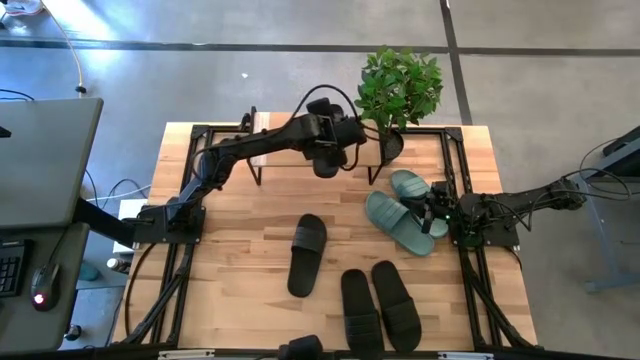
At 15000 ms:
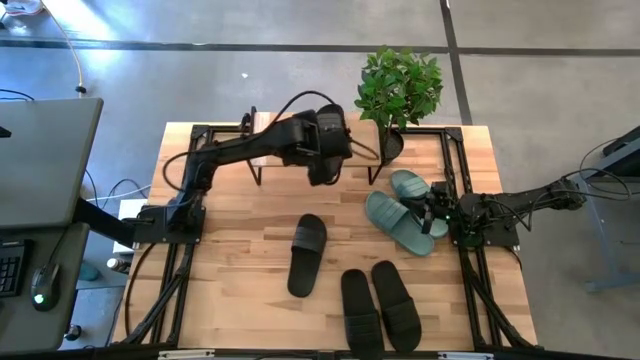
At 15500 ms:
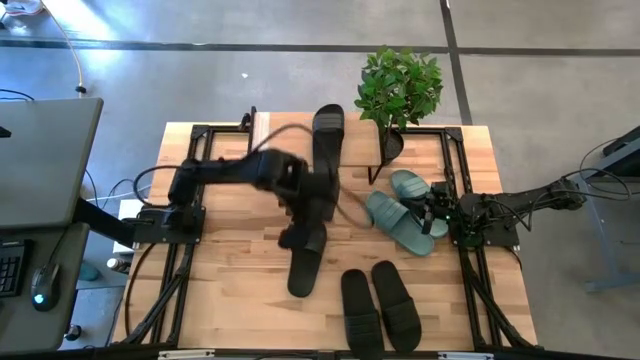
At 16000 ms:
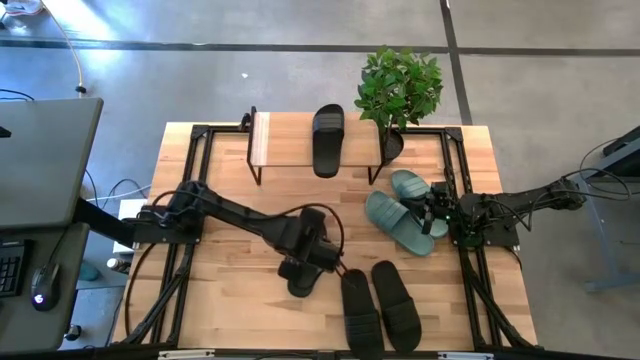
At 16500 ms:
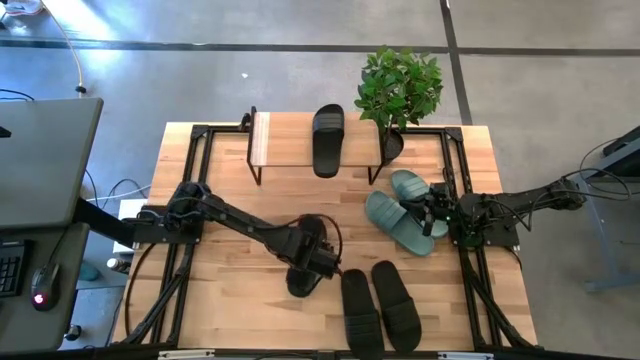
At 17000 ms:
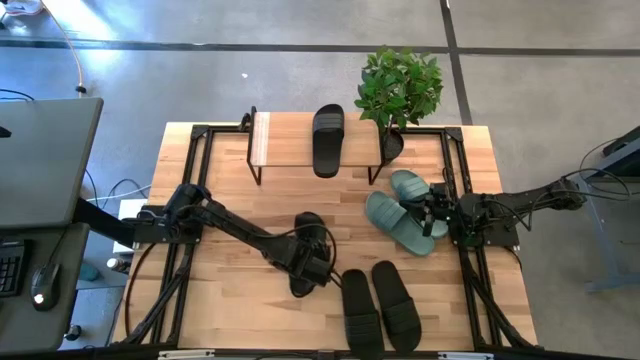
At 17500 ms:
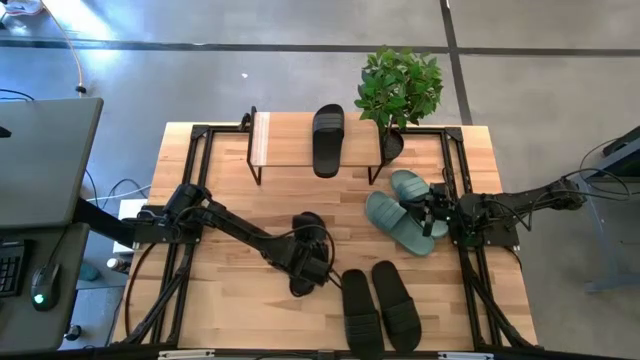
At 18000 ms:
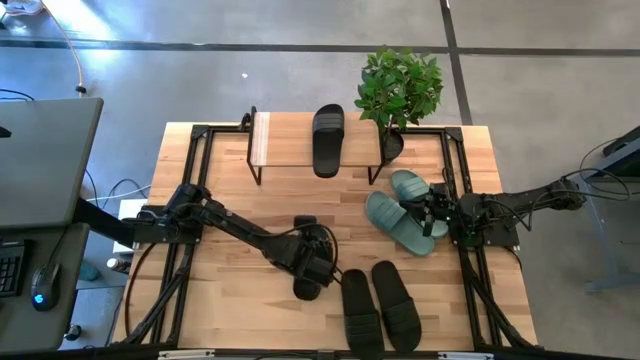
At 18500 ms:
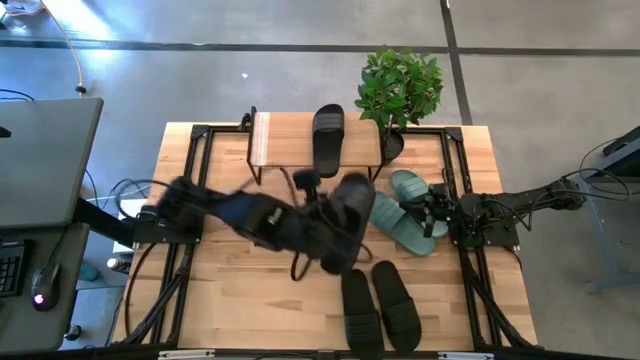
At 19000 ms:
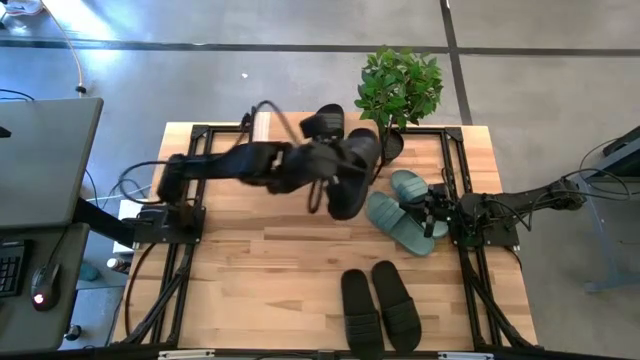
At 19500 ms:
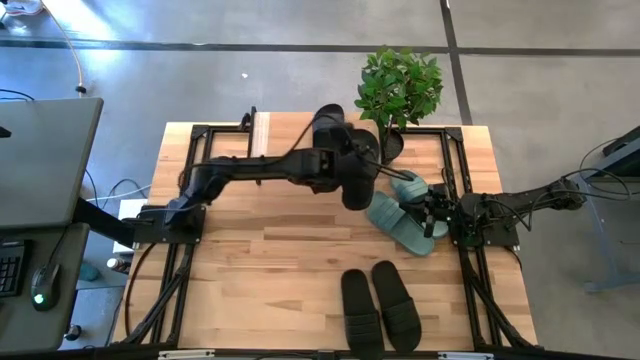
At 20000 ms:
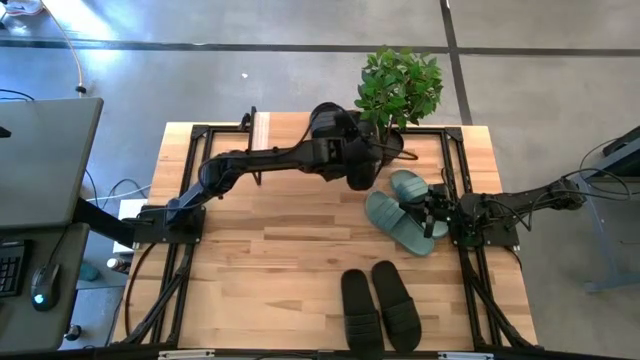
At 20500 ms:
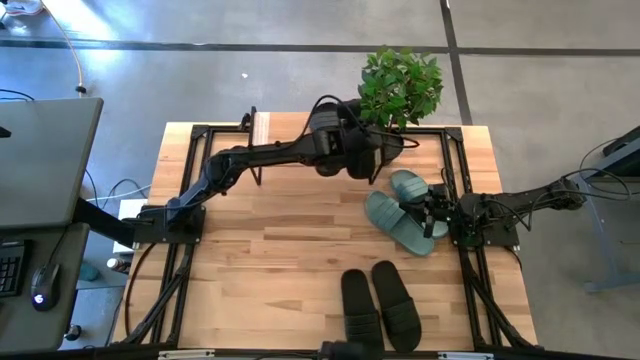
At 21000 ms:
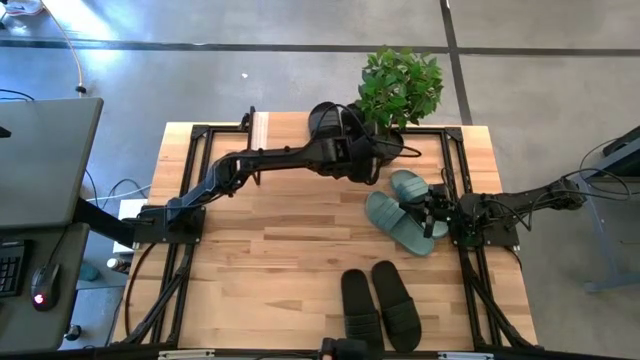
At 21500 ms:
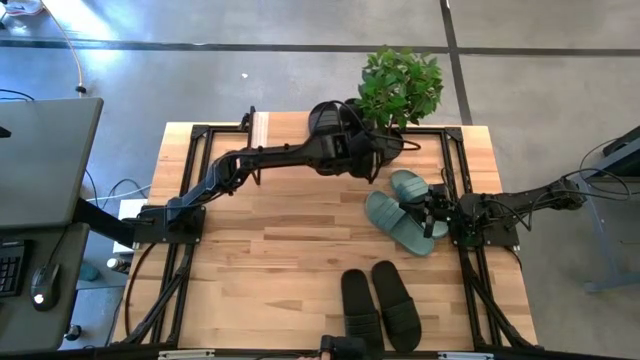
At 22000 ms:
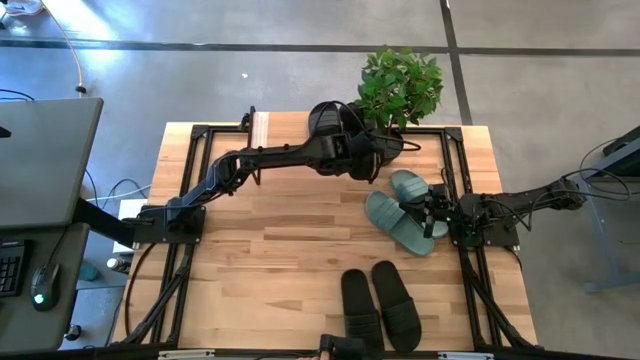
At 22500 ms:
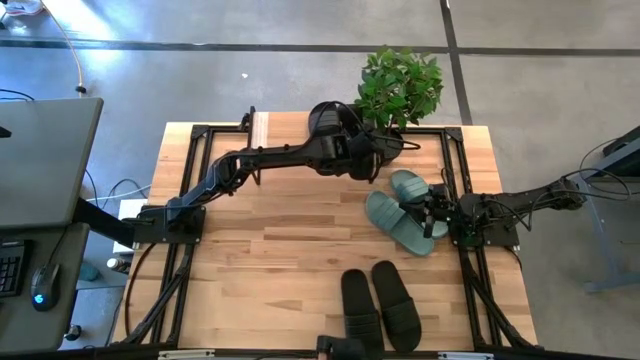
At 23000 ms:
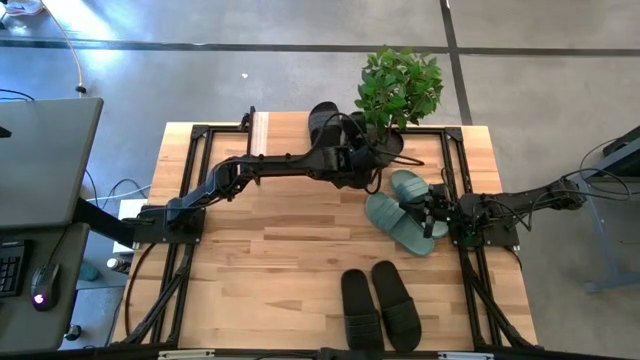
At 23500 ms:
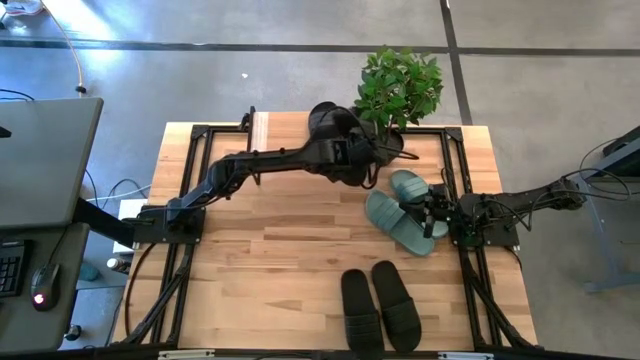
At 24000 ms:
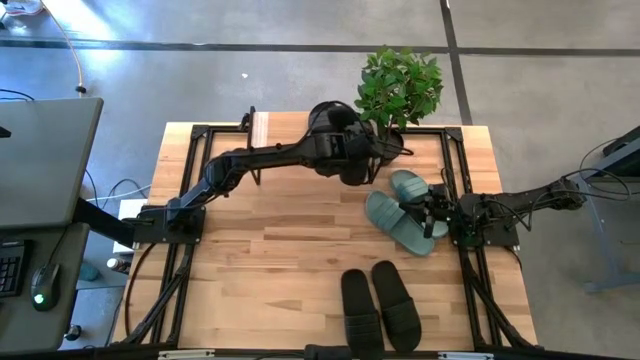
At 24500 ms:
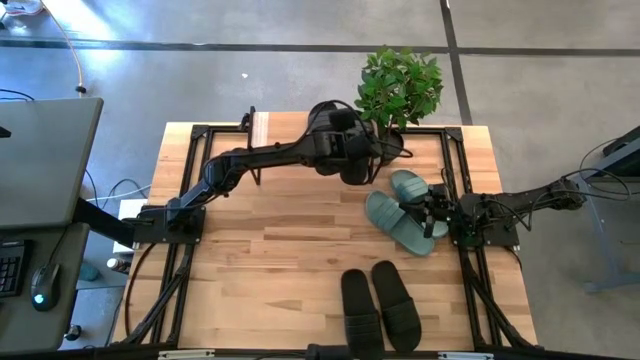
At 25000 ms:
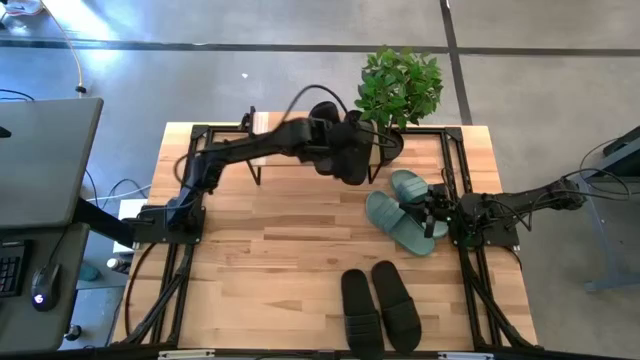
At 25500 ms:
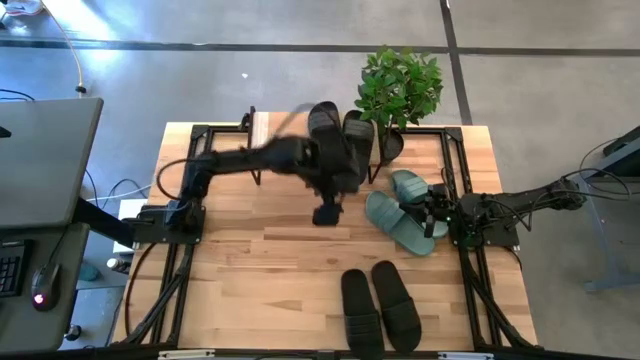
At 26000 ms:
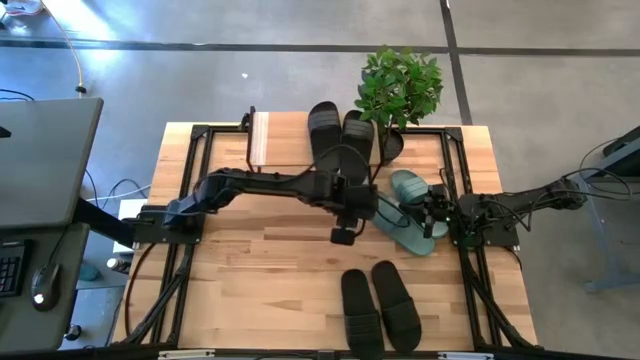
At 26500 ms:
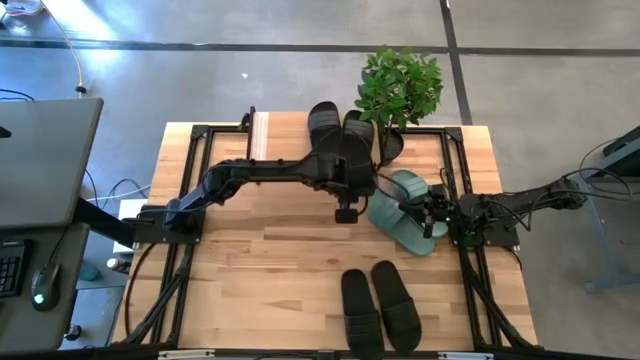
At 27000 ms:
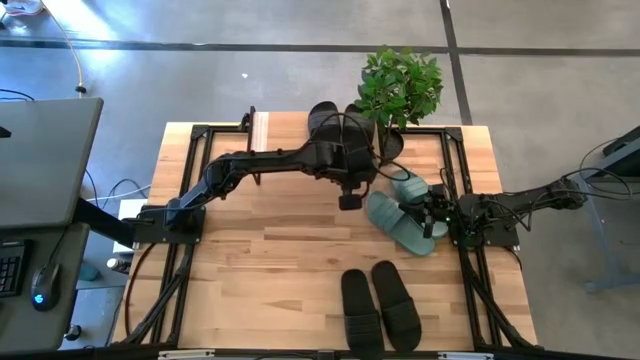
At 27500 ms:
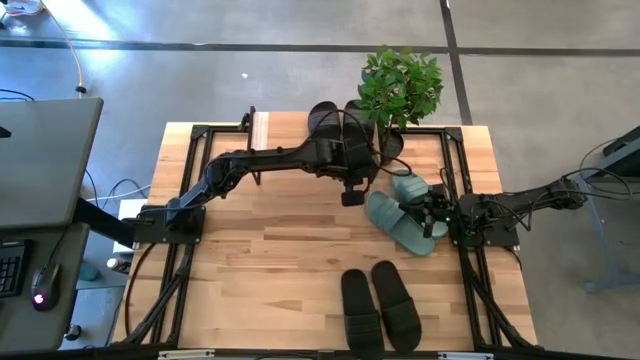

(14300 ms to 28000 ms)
Task: Pick and place slides into the shelf
Put the black slipper on the shelf

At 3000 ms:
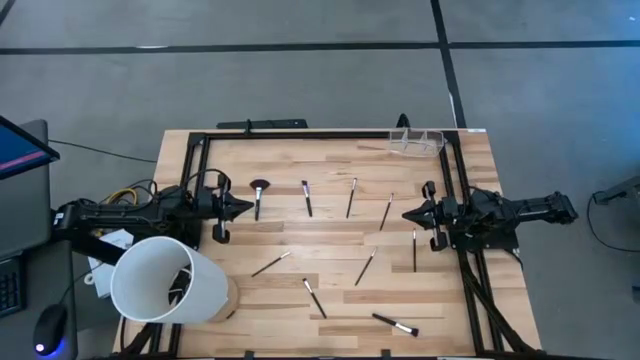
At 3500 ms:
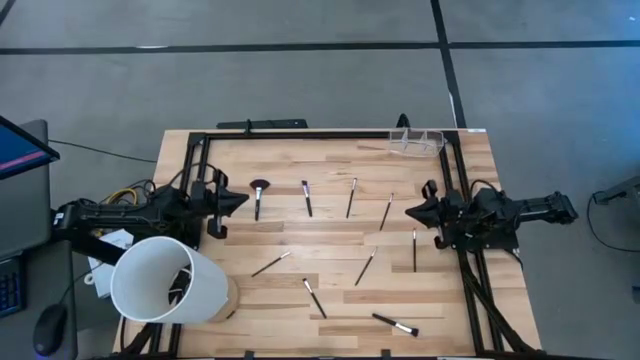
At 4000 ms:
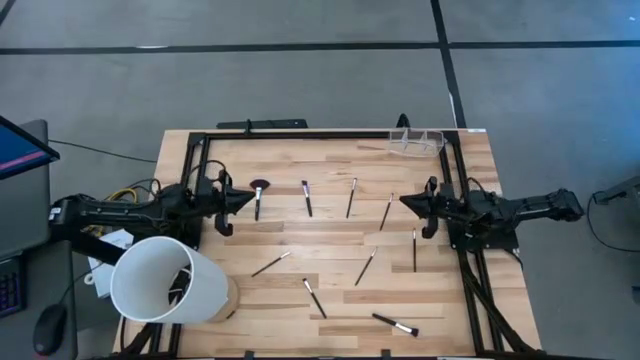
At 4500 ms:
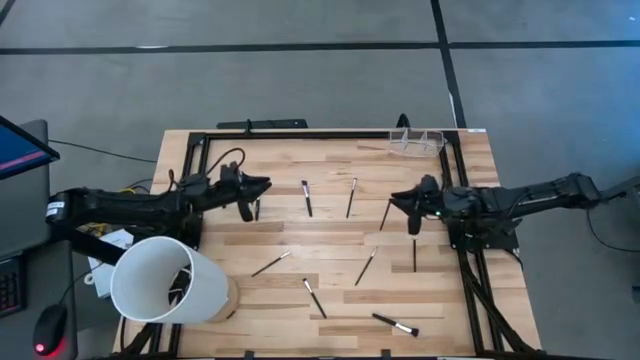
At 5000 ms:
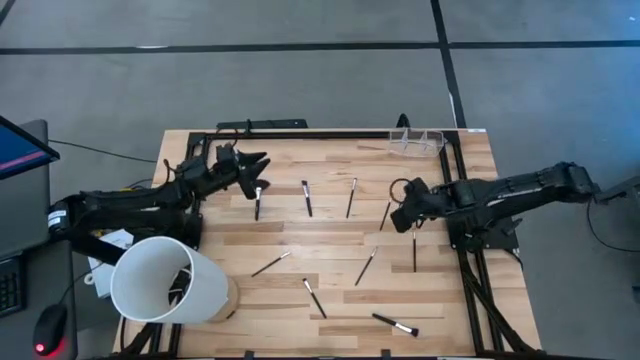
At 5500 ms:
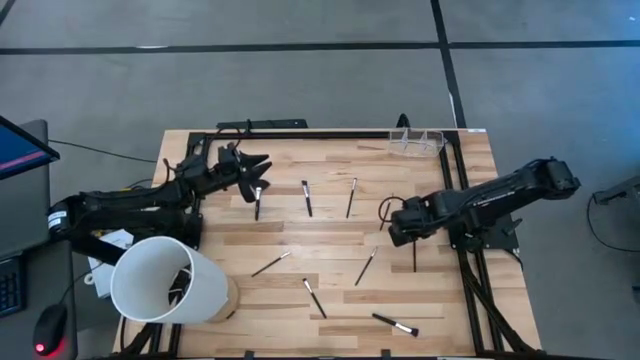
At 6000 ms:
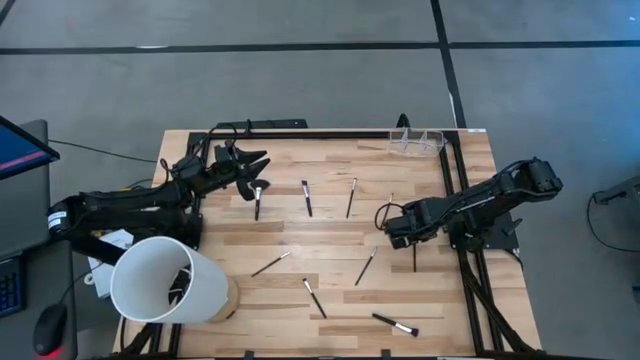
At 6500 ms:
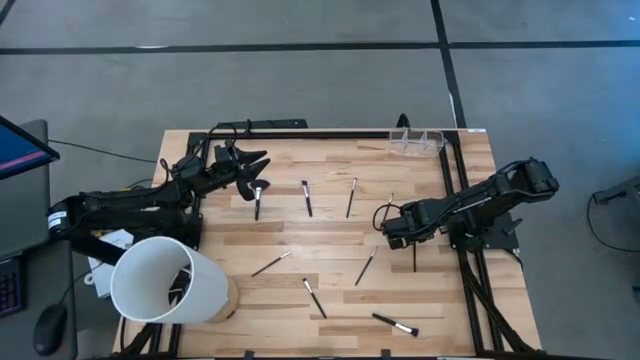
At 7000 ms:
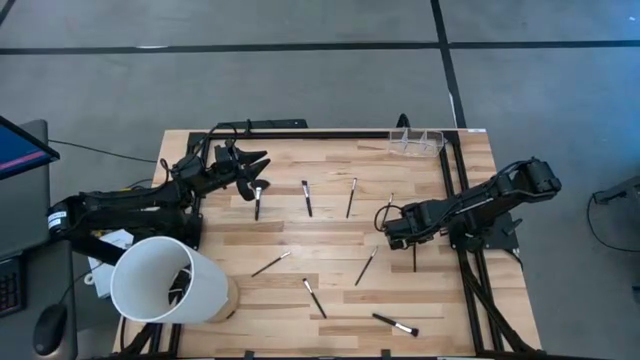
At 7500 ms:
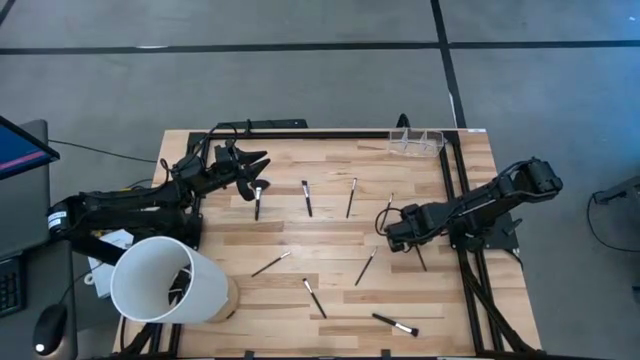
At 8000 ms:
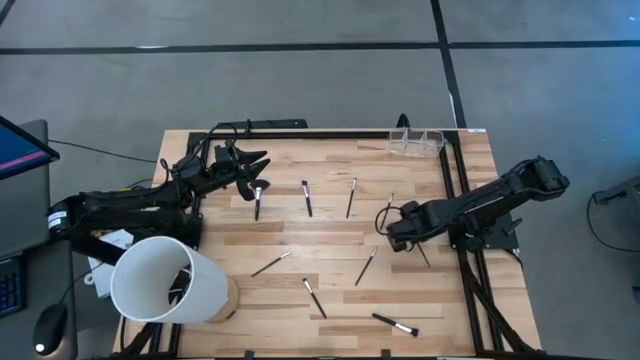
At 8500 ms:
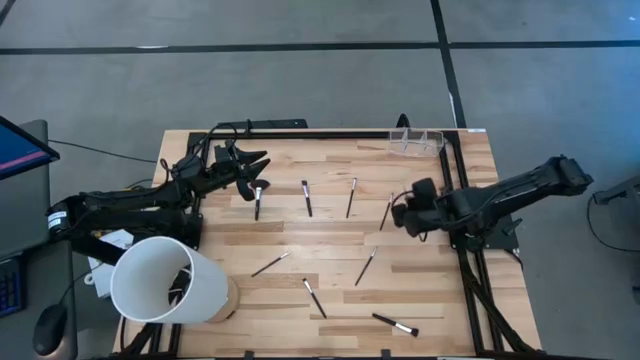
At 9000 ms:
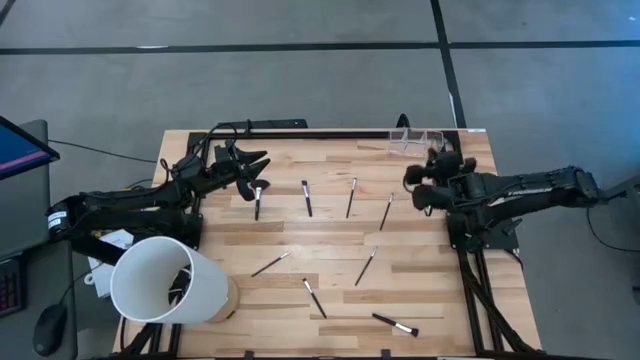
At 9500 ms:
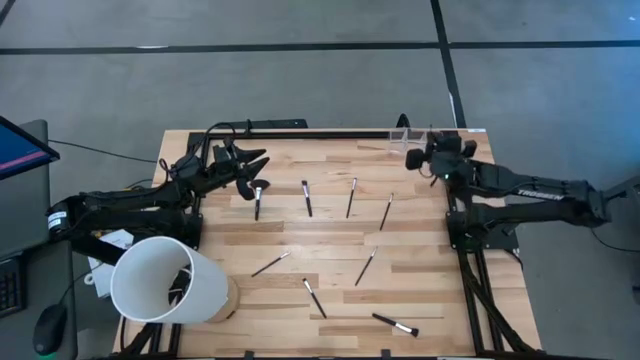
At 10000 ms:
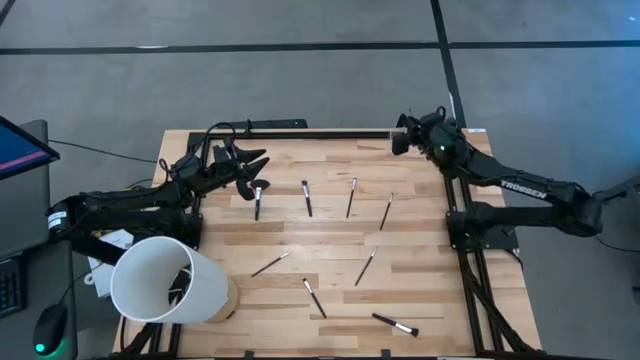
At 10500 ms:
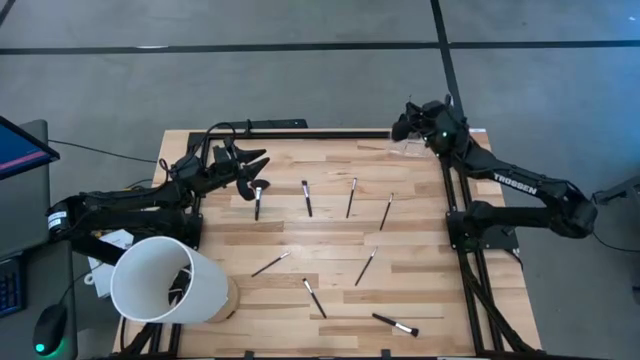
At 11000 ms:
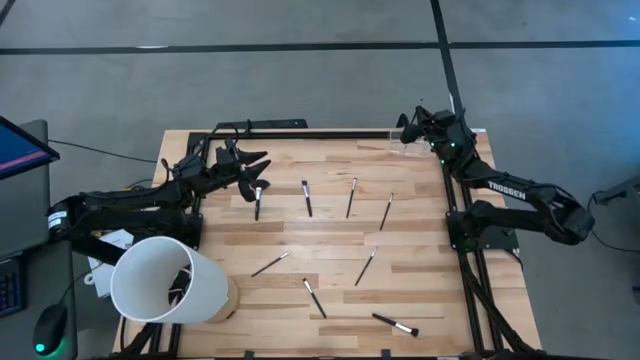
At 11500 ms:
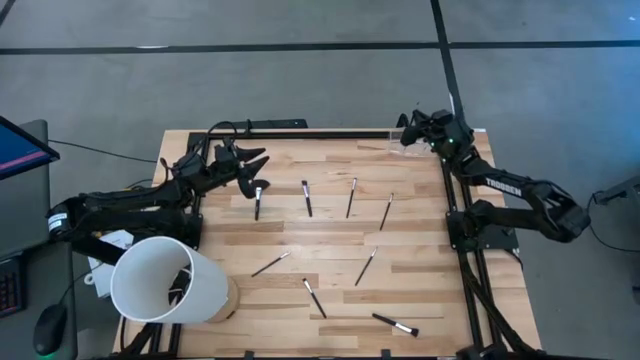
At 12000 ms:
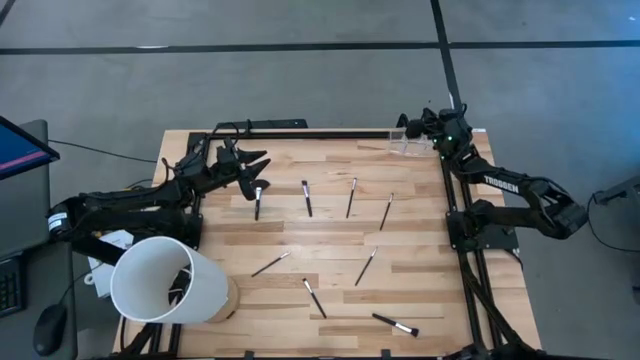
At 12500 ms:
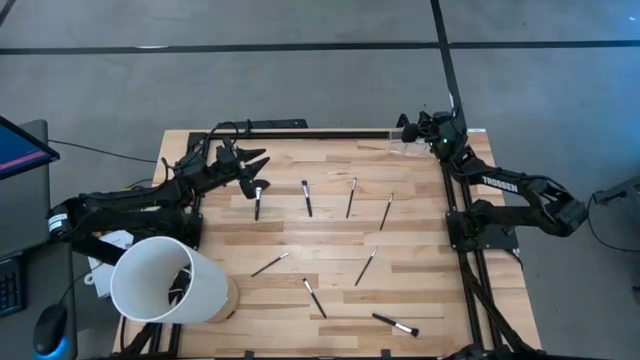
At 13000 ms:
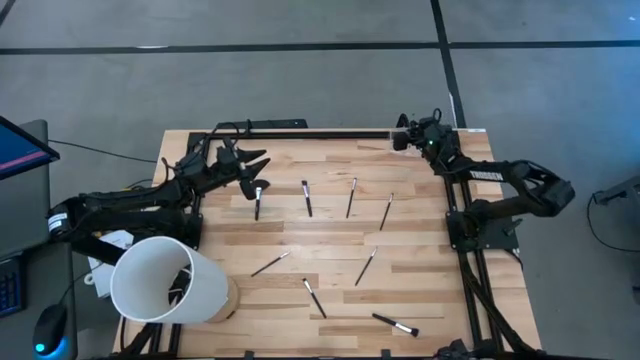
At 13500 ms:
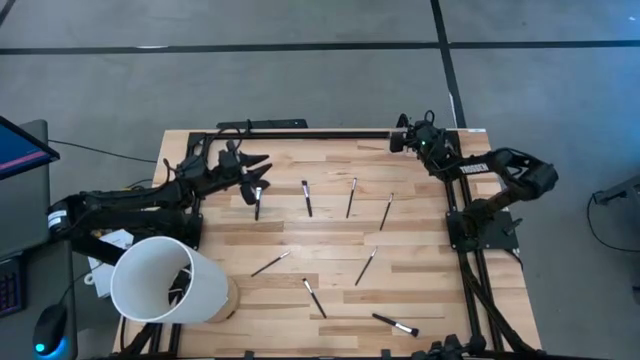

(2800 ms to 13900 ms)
Task: Put items in baskets/containers
Put the black eyeshadow brush into the middle section of the transparent organizer
